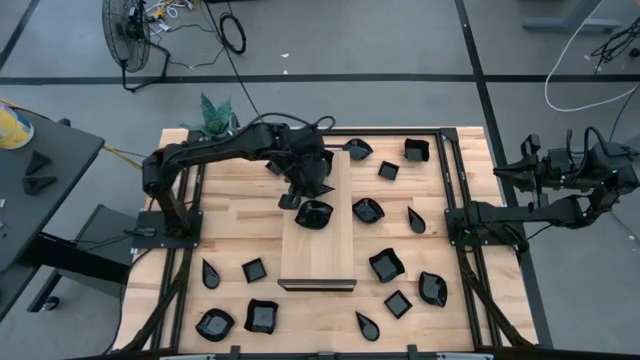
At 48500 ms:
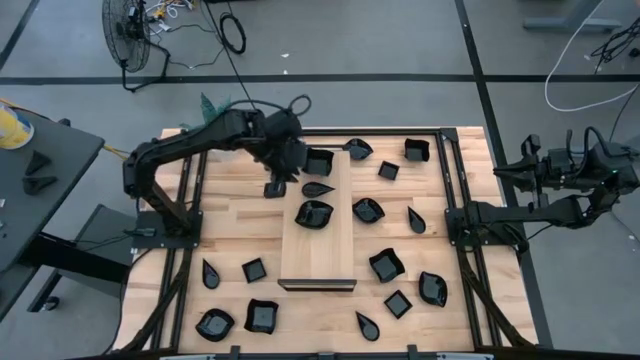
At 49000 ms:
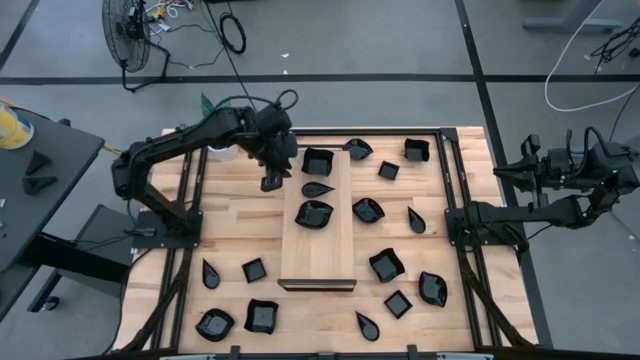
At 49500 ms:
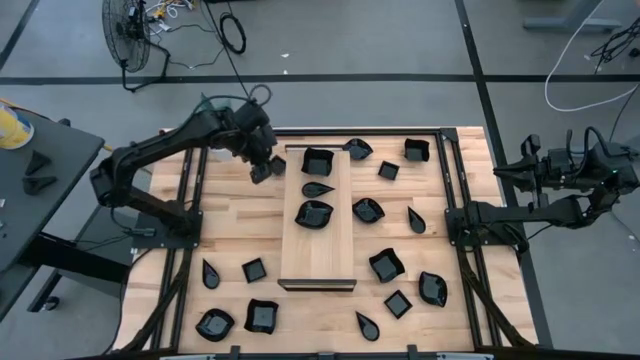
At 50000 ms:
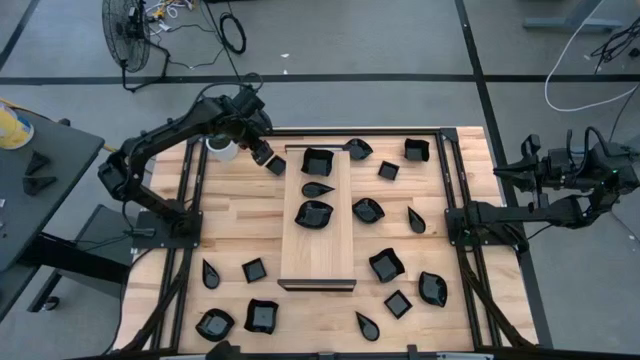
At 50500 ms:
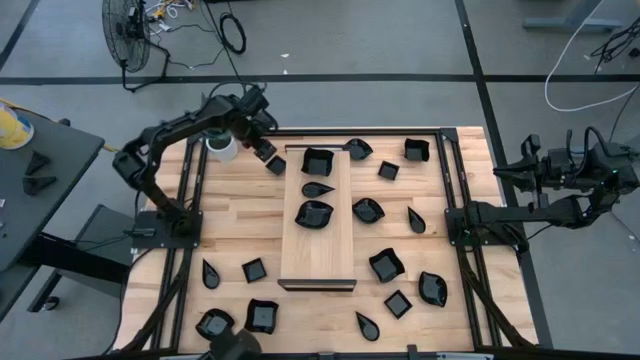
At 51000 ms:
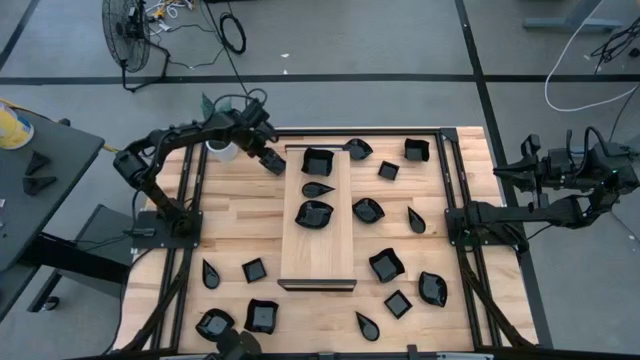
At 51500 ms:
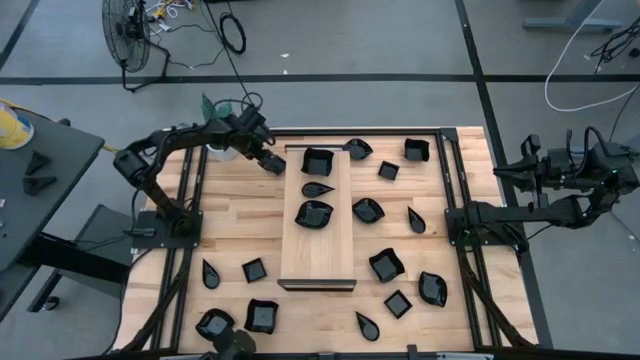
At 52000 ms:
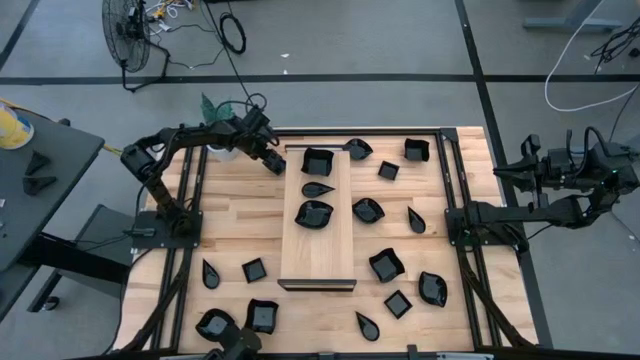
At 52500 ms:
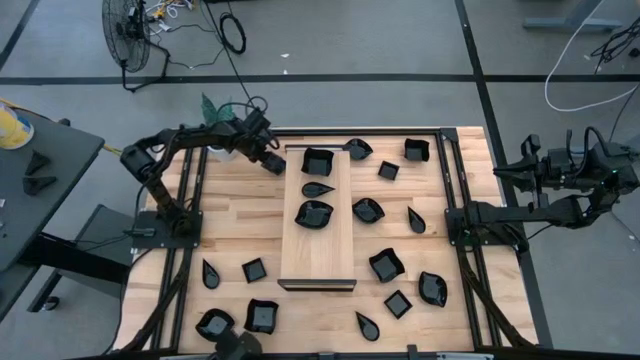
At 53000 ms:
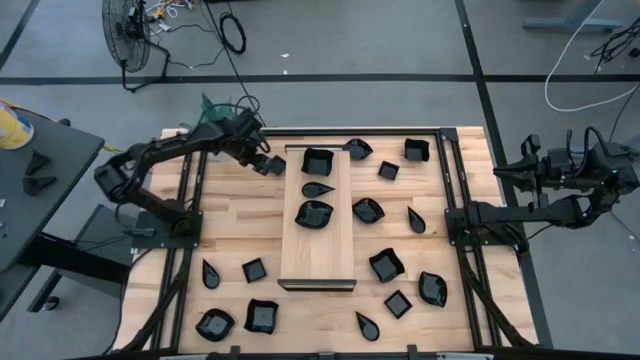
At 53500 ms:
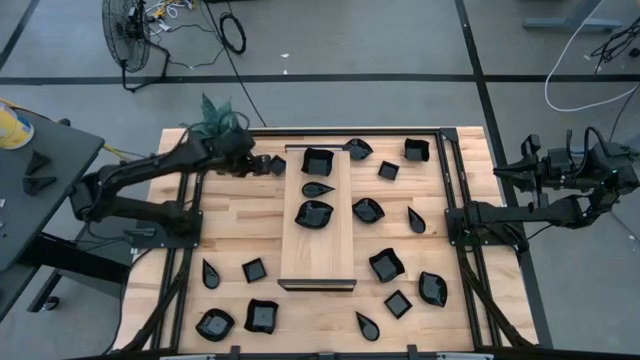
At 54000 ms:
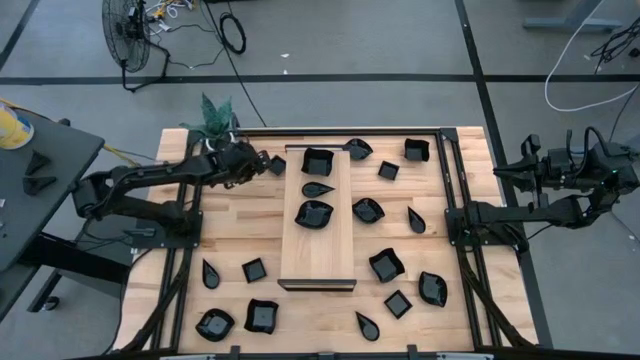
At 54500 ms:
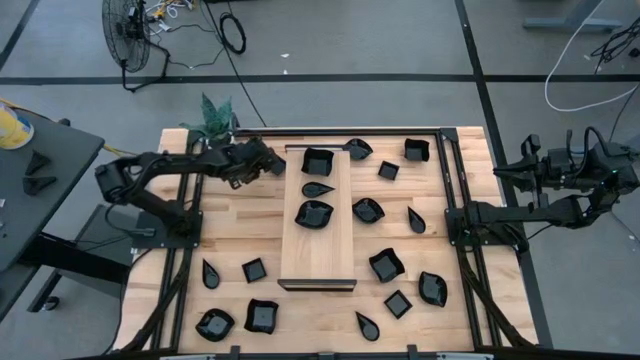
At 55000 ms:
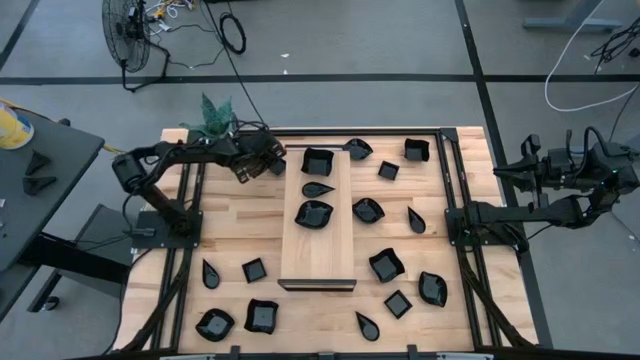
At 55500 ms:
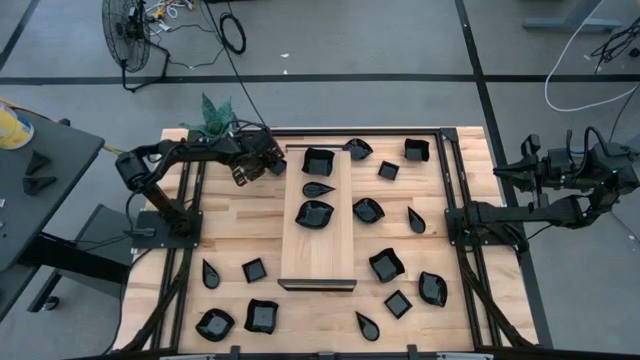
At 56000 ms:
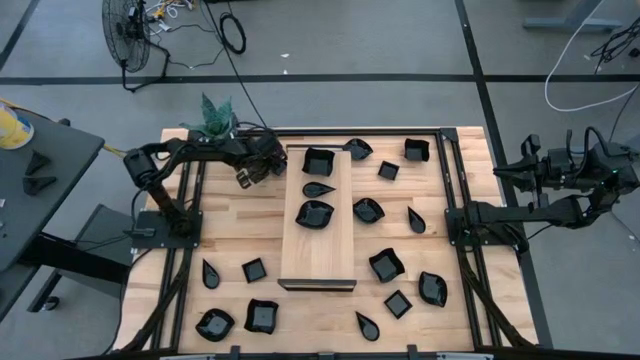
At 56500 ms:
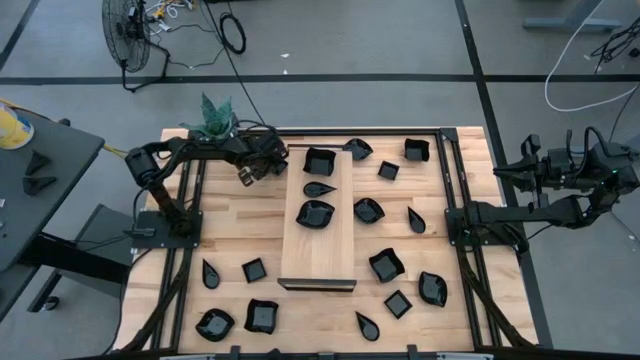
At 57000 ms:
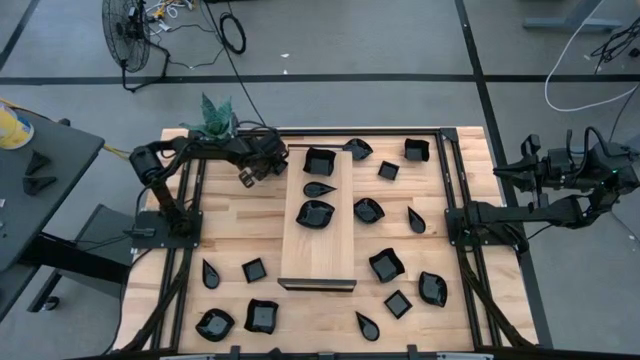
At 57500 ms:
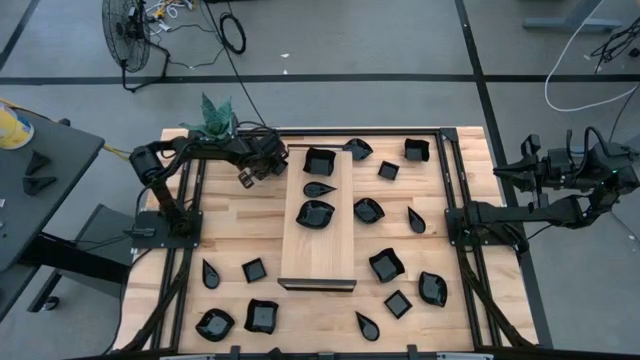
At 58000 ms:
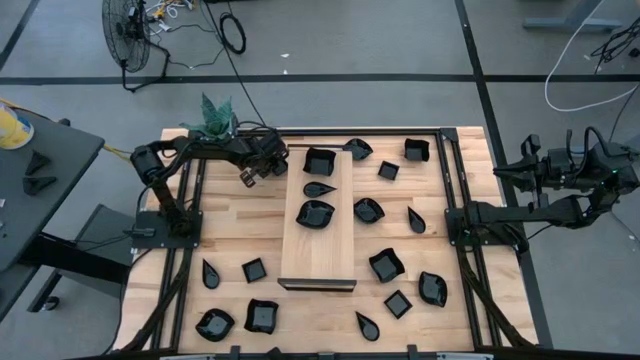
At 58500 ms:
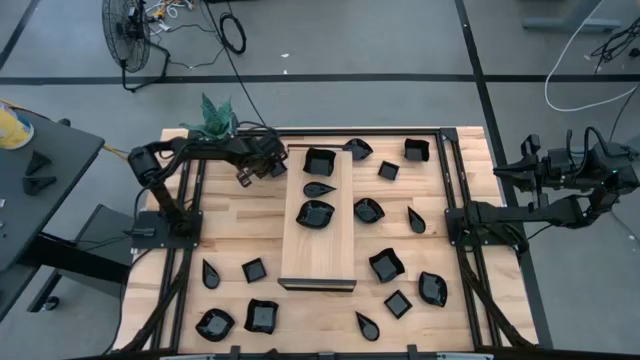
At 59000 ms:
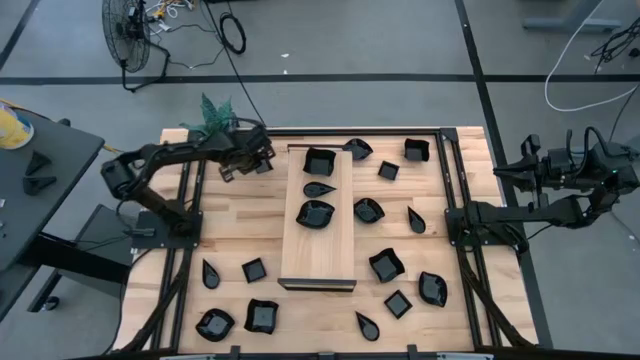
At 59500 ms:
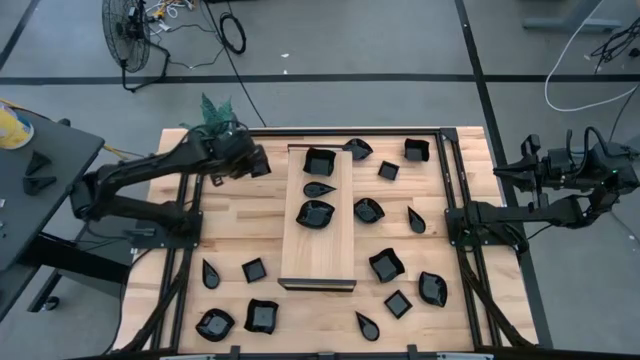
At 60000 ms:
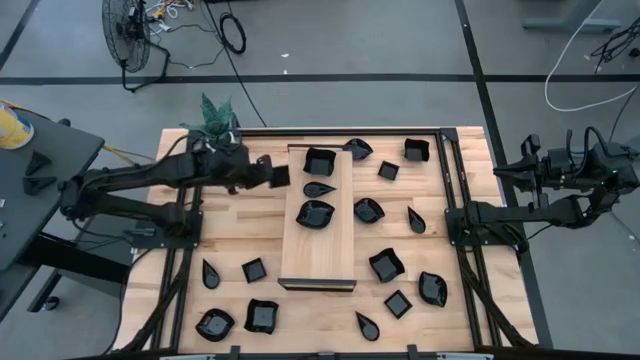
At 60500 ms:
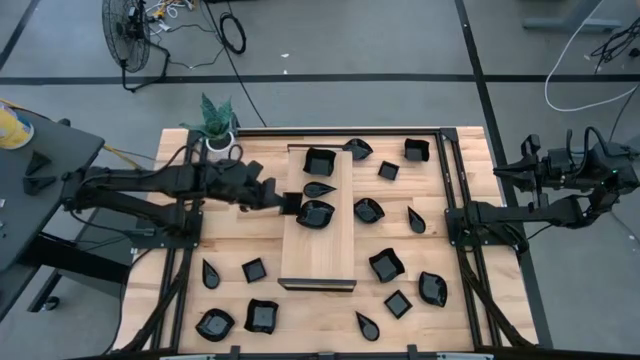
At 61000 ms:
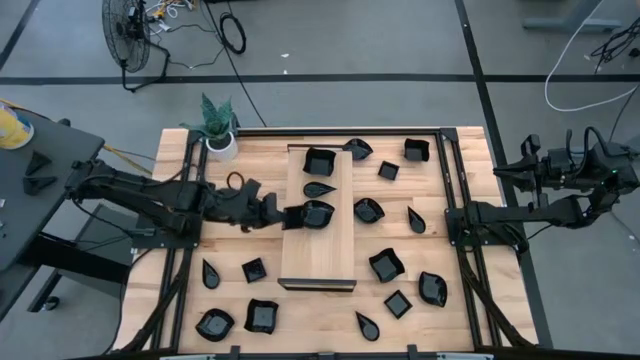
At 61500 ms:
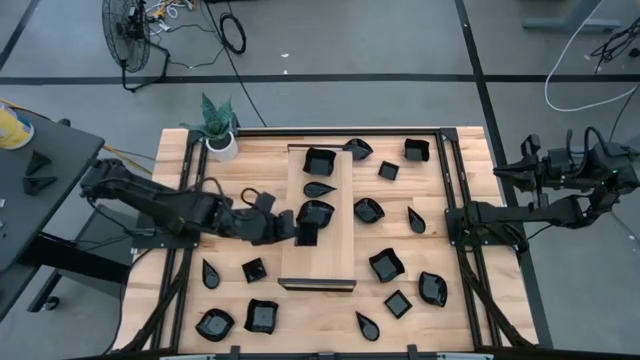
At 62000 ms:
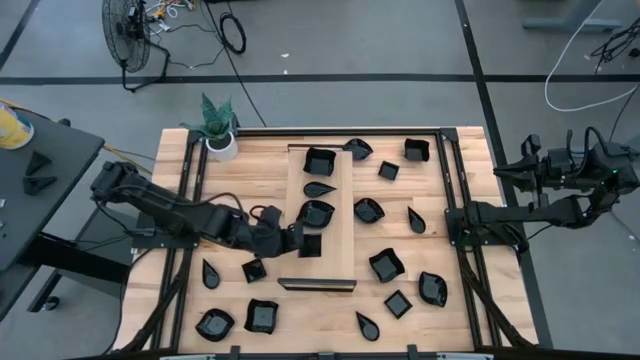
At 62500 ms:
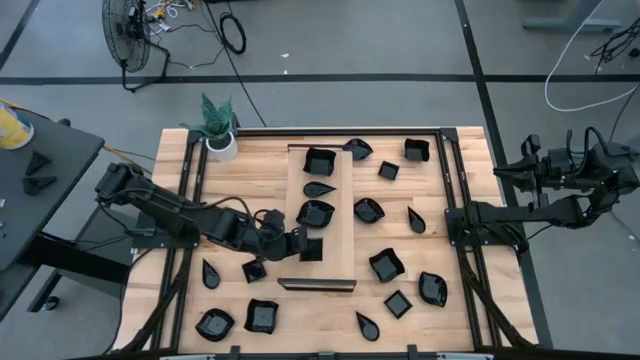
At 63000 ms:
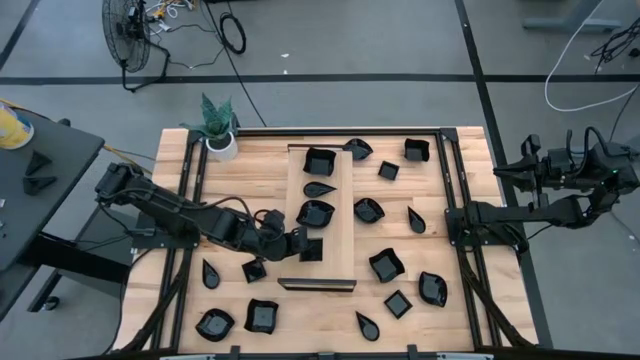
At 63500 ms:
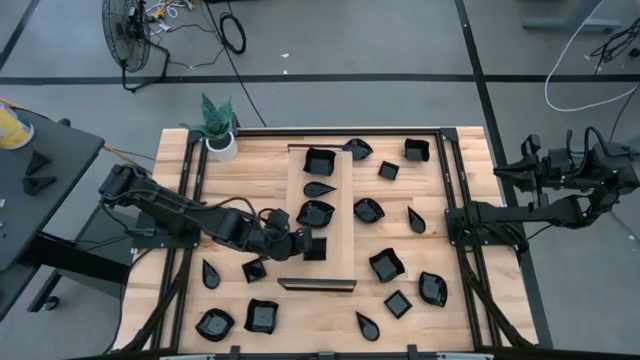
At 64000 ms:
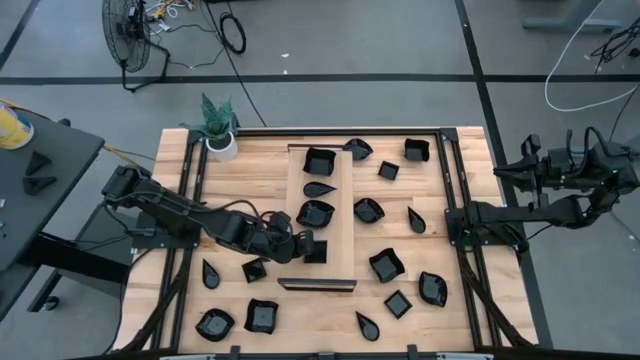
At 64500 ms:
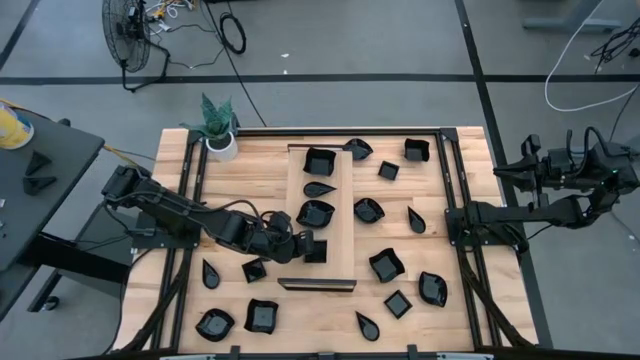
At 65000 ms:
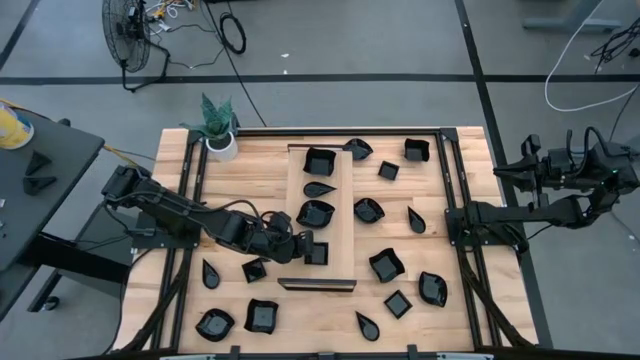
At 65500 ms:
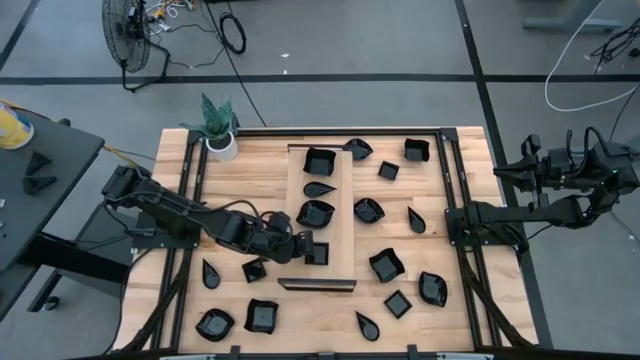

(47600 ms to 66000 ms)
Task: Pick & Place Mini shaped plates
Put the square plate on the shelf

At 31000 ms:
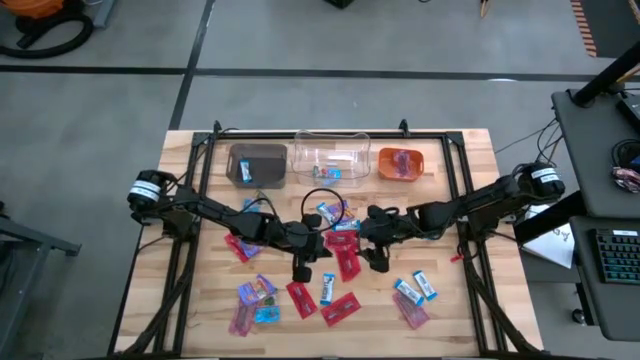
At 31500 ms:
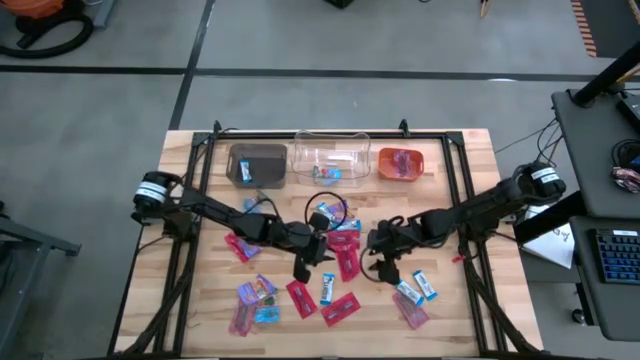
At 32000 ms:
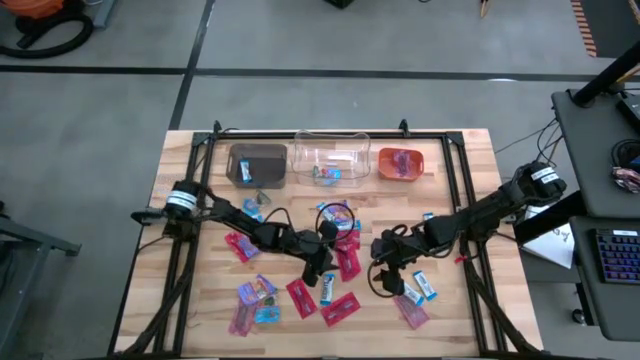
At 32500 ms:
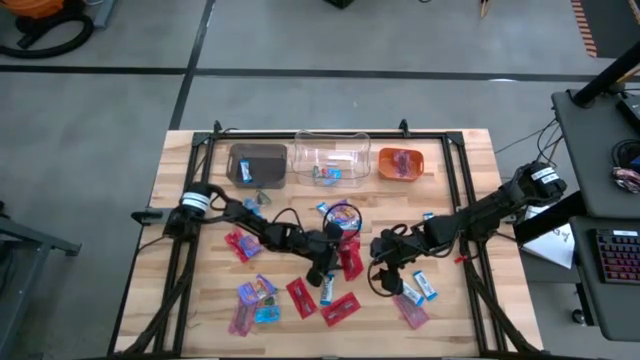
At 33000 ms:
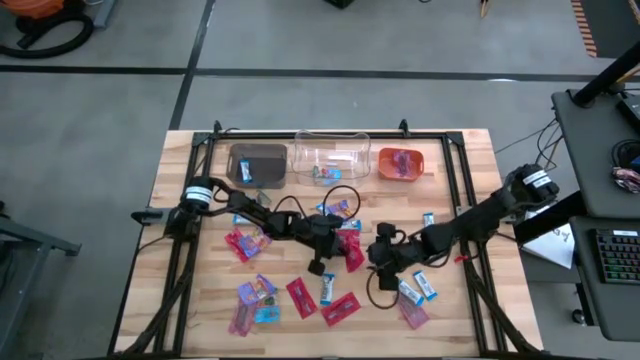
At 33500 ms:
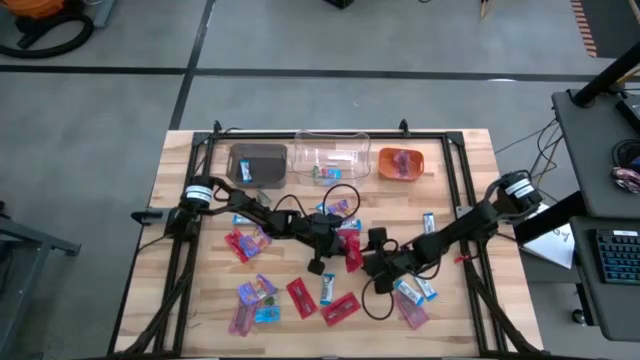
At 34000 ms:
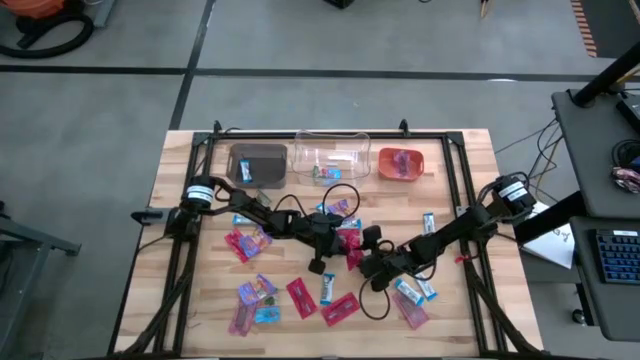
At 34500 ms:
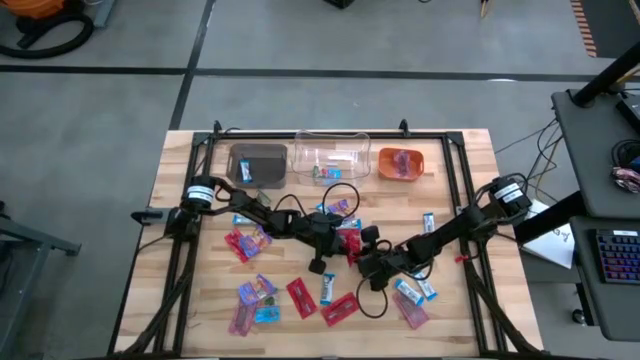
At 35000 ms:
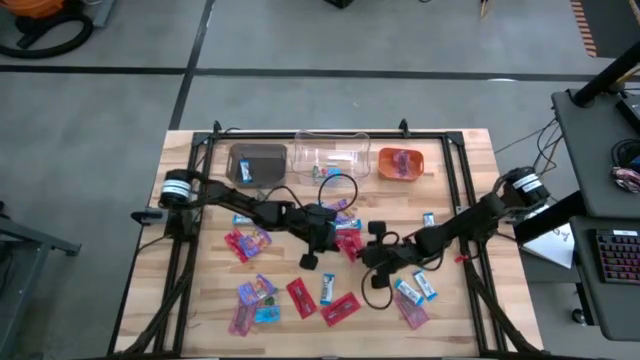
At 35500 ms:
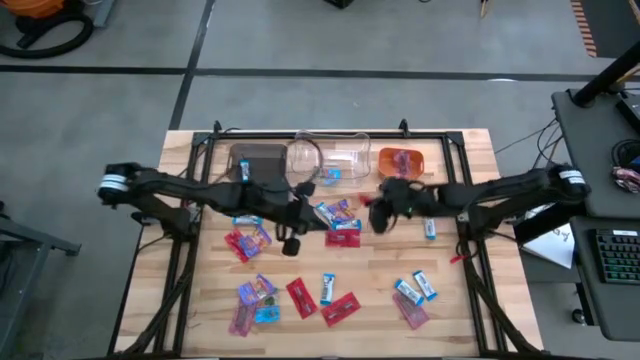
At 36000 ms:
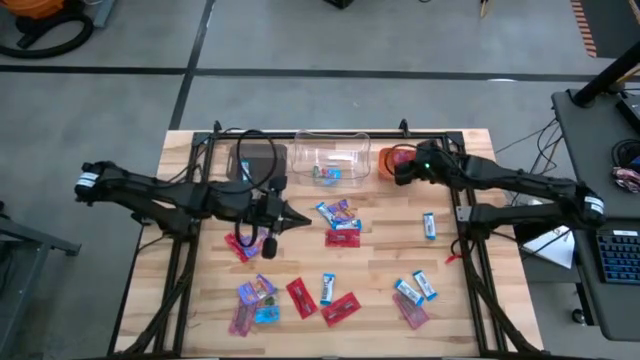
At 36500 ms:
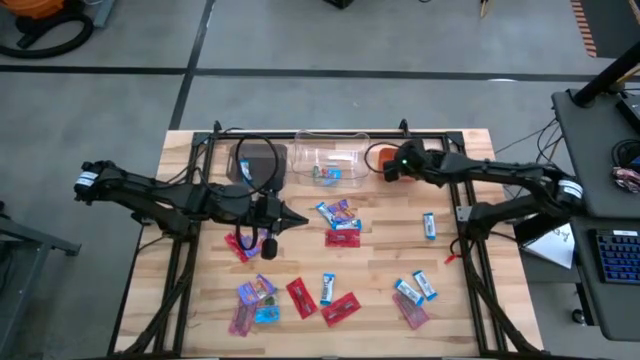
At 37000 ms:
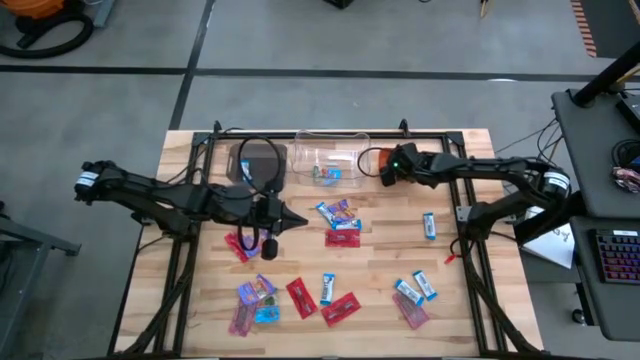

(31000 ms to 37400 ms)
Task: Sort candy
Put the red candy into the orange bin
